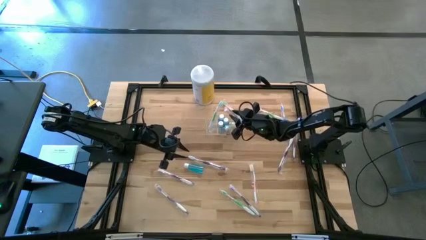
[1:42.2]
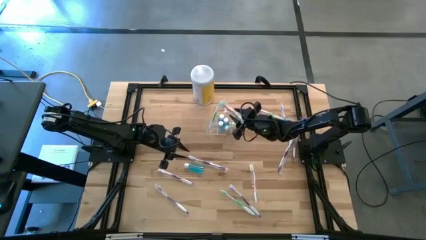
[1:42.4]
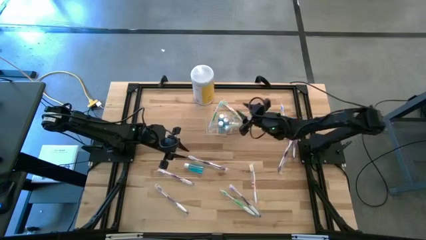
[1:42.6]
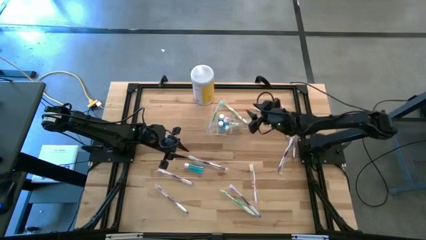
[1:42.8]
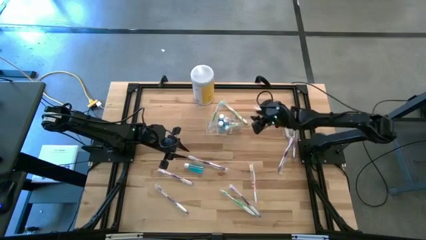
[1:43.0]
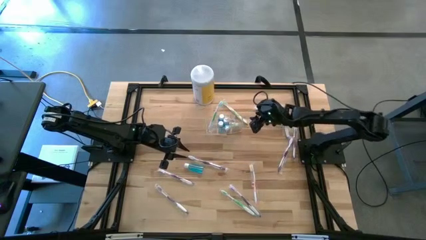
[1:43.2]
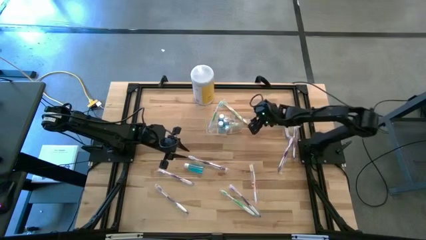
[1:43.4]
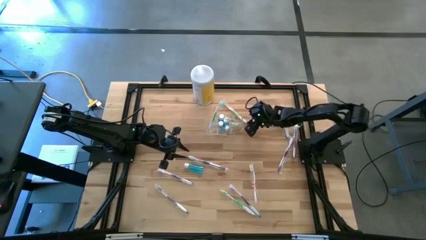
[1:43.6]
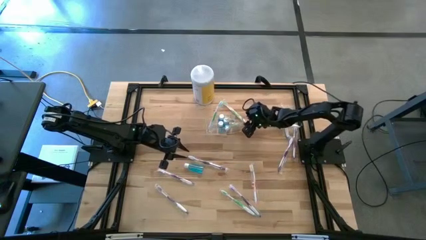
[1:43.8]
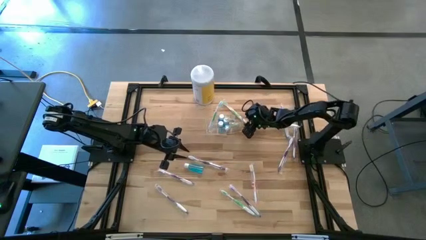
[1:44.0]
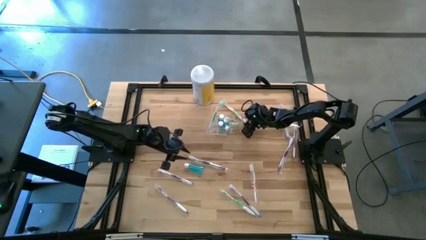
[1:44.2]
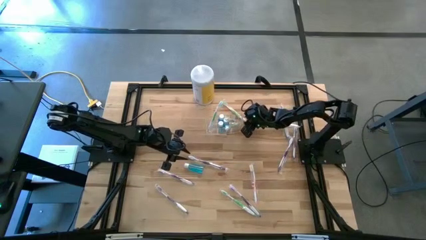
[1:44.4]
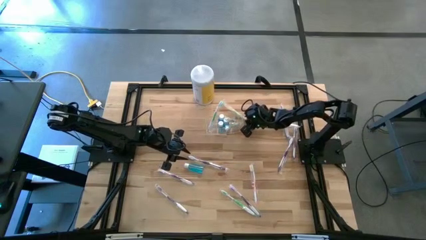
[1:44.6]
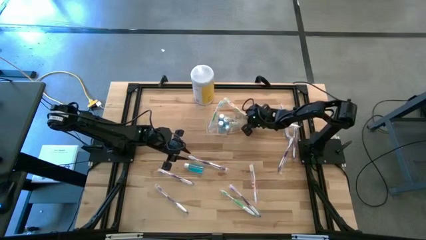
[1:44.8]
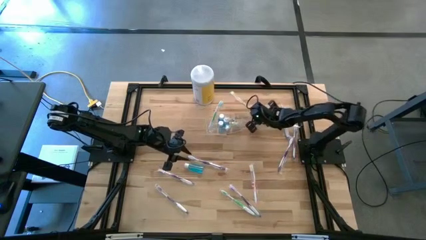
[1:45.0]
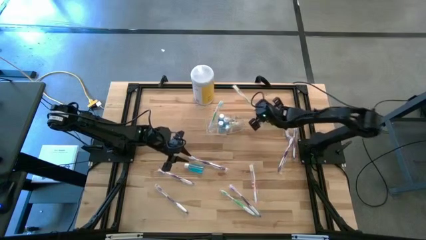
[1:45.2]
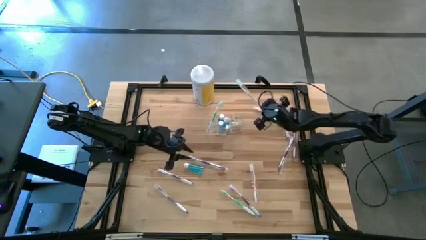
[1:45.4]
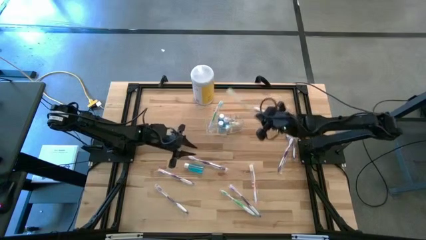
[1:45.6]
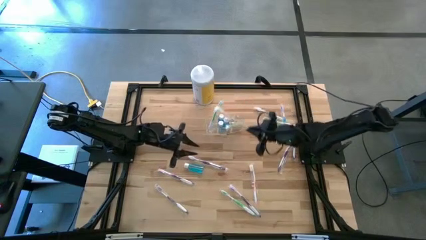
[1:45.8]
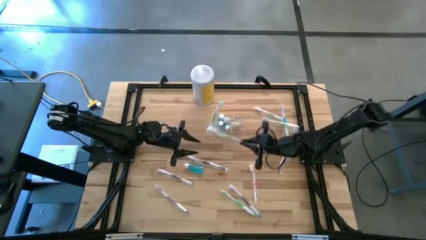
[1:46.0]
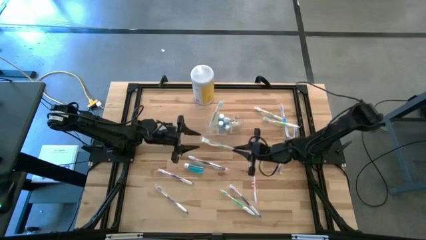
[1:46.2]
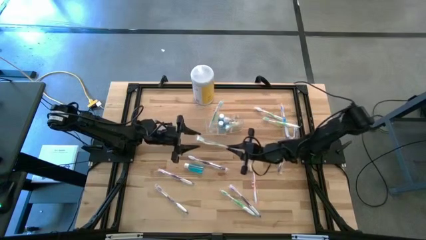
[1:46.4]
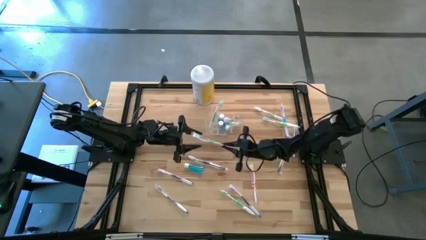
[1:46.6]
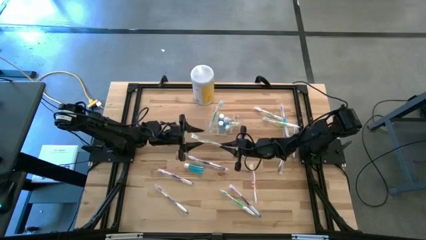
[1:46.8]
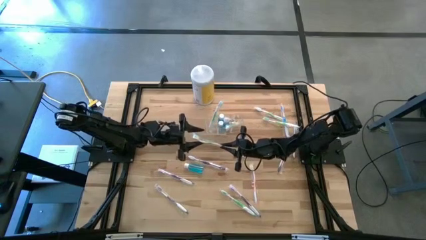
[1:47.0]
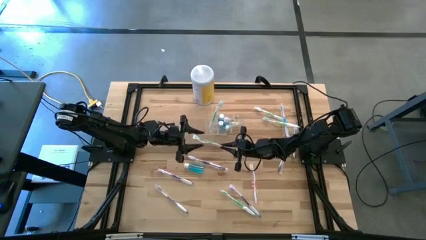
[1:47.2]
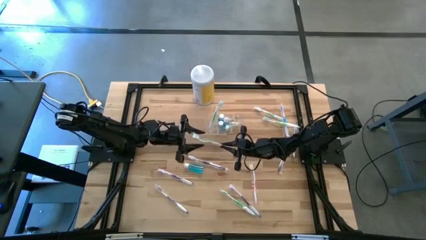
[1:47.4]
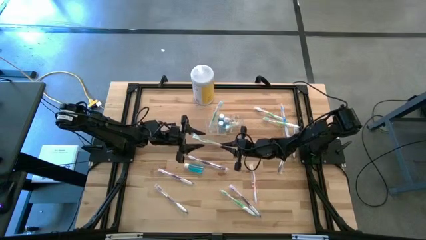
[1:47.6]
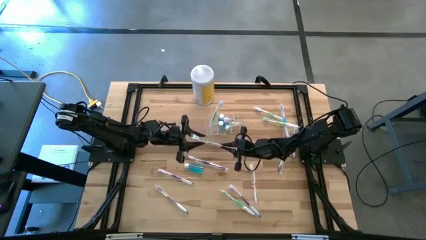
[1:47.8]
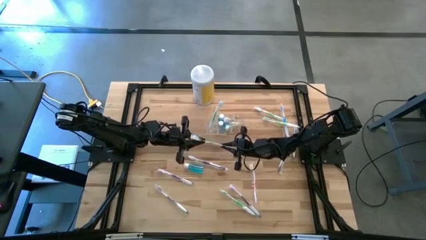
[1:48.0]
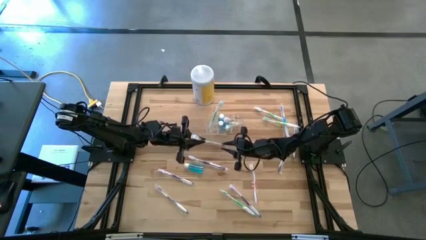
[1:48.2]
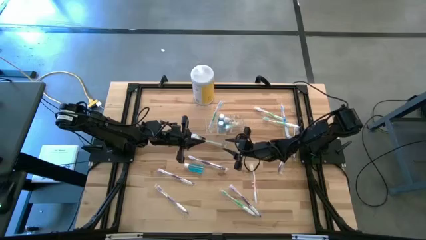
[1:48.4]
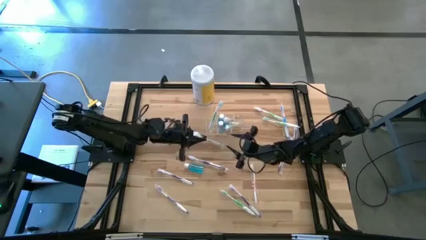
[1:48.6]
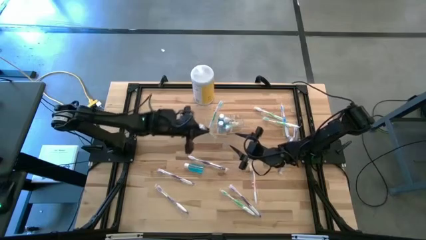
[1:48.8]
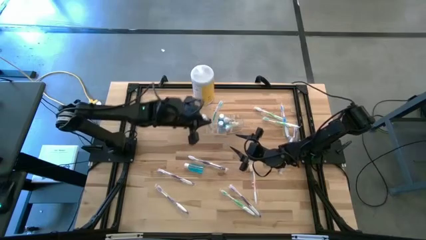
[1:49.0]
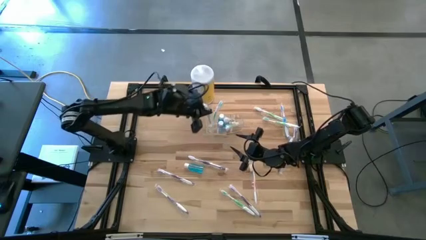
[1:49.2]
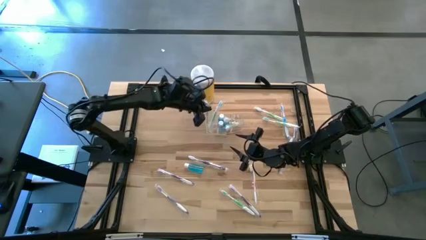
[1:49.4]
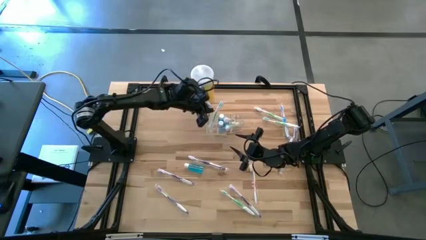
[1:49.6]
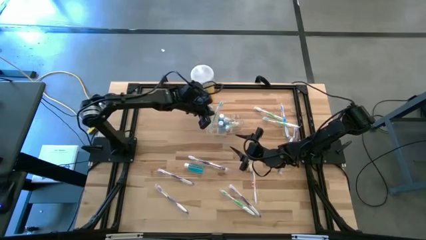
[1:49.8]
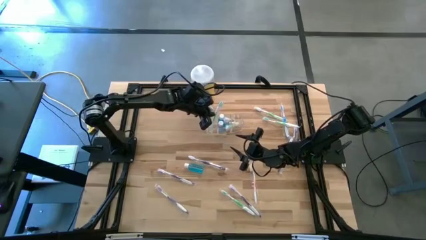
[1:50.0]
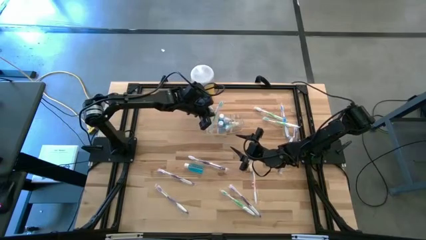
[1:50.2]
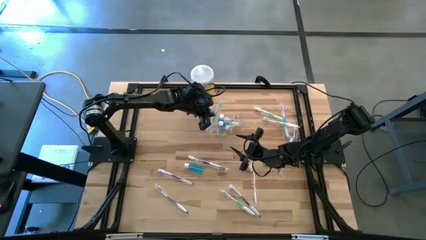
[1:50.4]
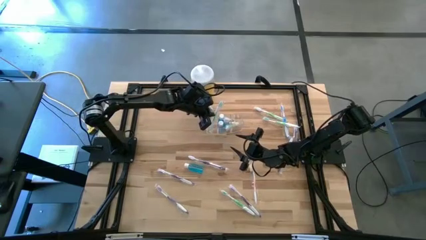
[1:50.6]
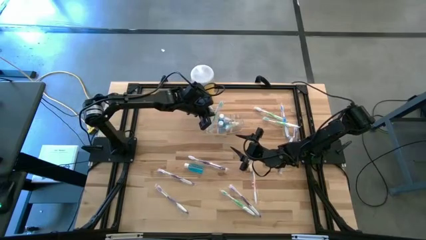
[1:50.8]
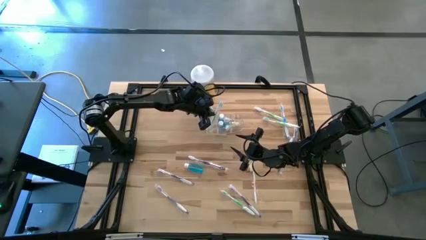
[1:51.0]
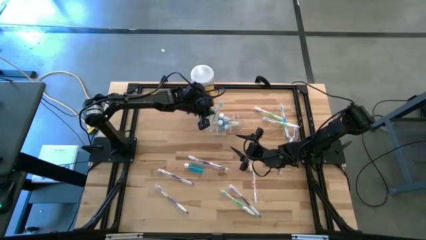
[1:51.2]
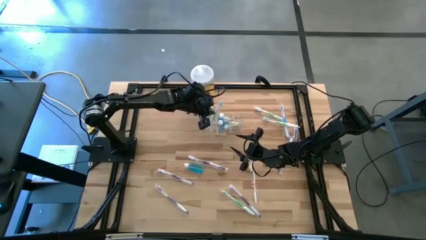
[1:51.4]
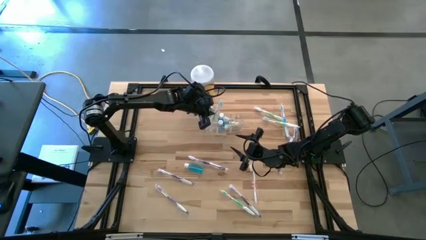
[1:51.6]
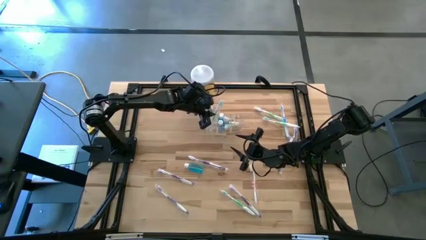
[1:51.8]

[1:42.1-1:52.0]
Task: Pick & Place toothbrushing station
Put the green toothbrush into the transparent organizer

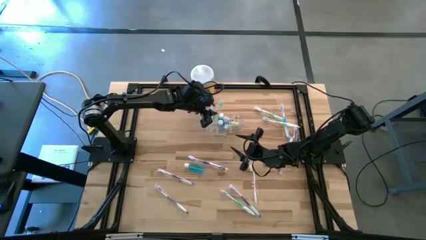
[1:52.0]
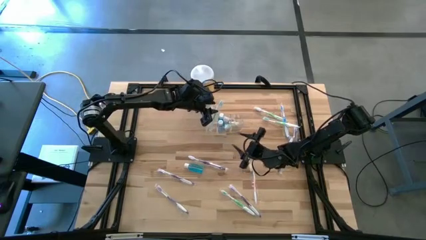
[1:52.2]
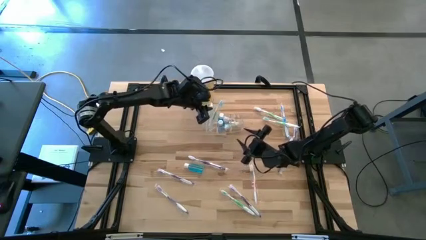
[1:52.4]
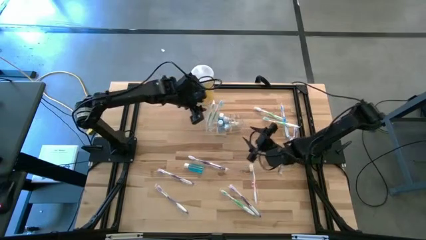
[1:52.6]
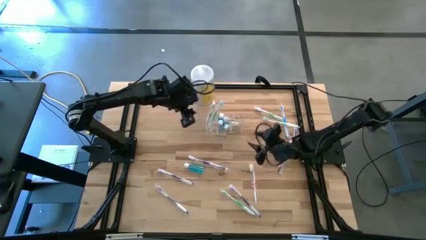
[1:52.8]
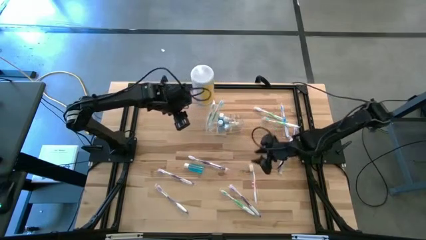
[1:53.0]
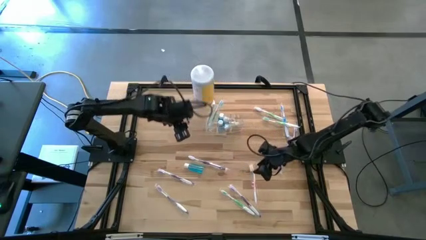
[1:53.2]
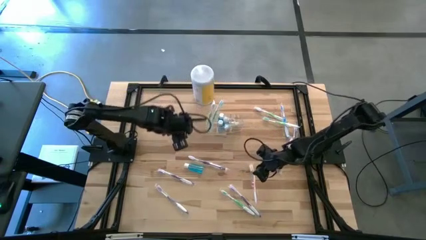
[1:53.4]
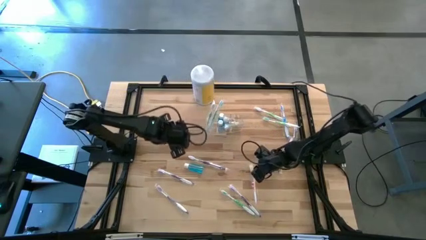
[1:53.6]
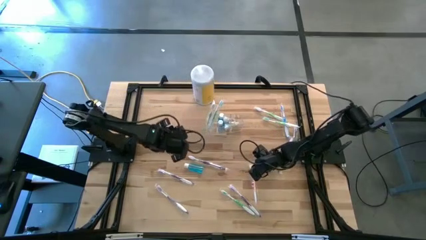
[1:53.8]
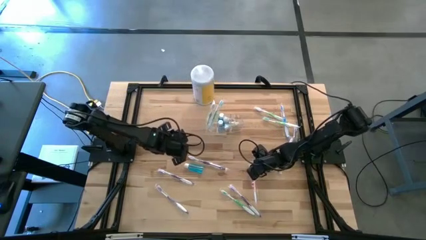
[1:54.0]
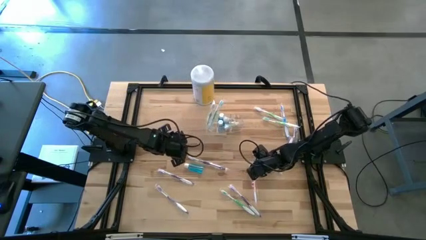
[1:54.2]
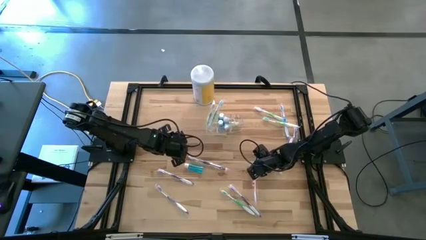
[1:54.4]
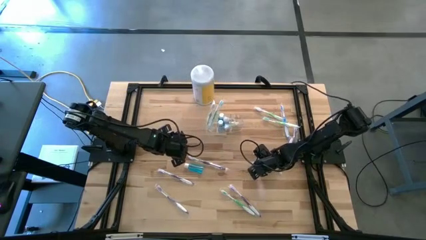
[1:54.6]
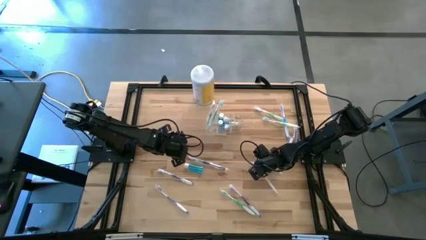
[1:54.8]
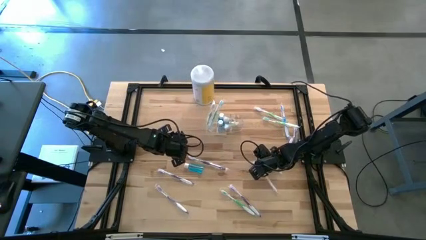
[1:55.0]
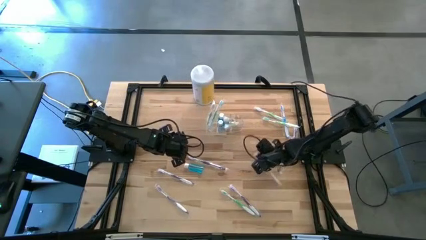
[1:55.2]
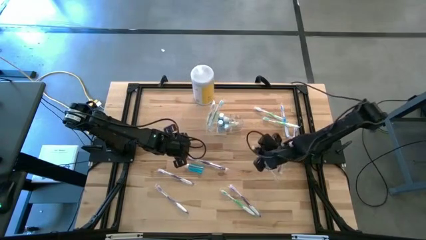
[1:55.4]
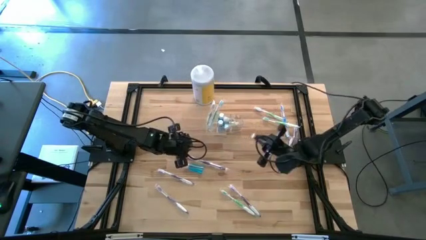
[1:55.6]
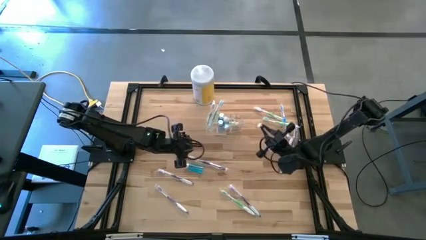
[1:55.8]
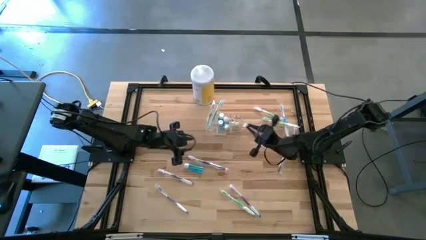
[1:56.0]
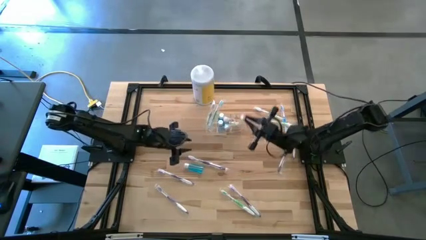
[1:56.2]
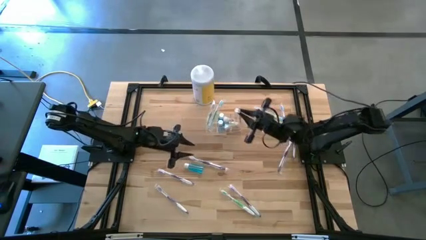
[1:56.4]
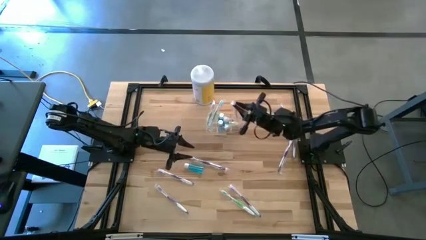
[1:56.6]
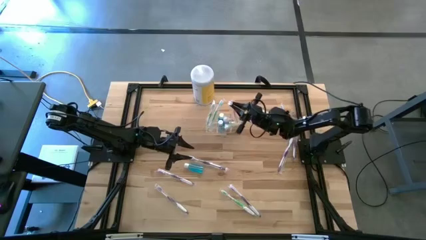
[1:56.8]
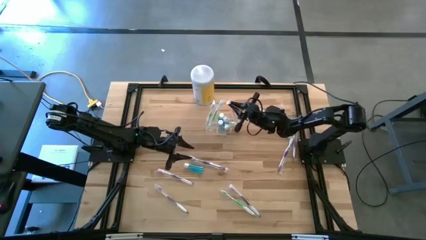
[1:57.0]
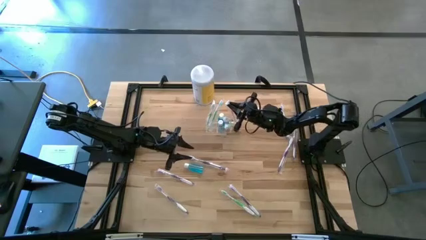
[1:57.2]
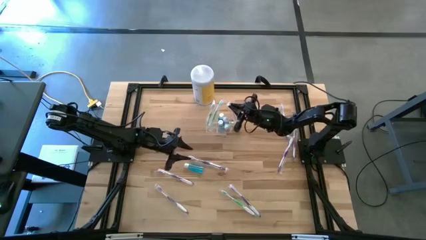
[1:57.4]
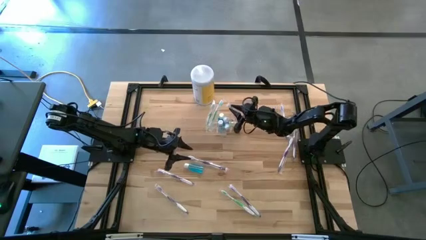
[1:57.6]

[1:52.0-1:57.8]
Put the orange toothbrush into the transparent organizer
